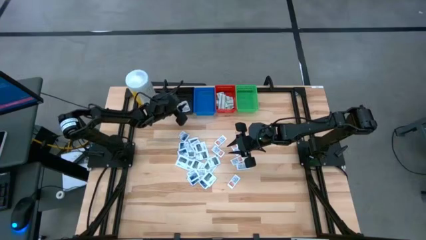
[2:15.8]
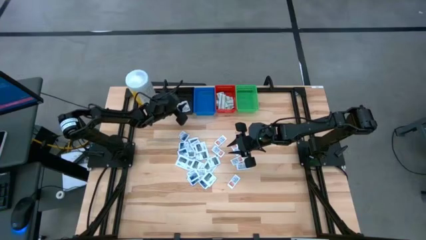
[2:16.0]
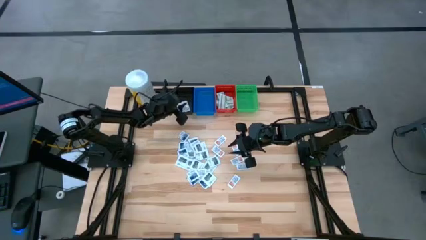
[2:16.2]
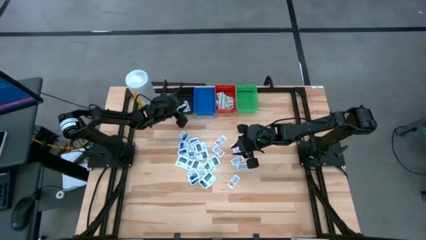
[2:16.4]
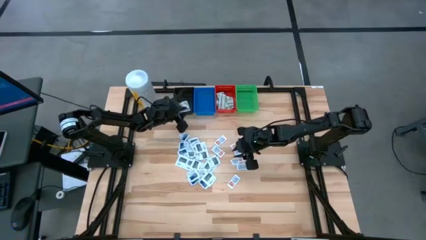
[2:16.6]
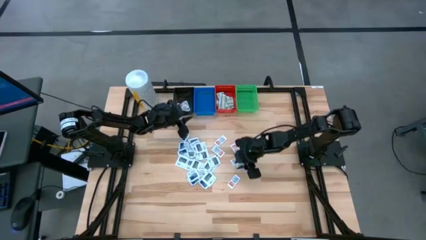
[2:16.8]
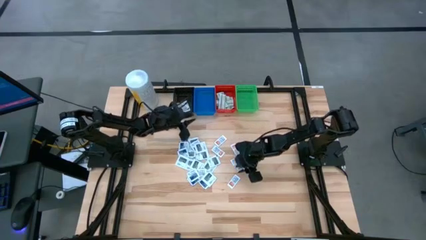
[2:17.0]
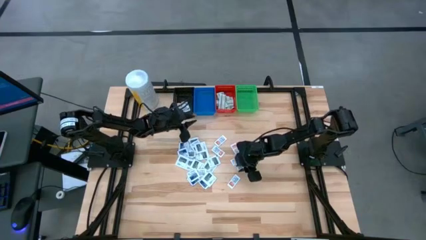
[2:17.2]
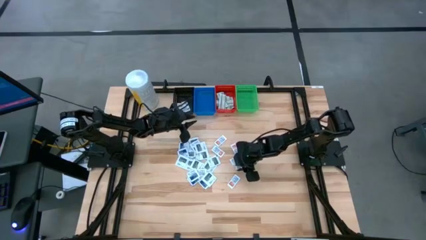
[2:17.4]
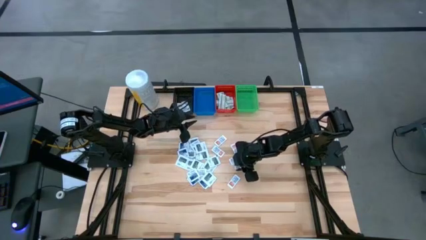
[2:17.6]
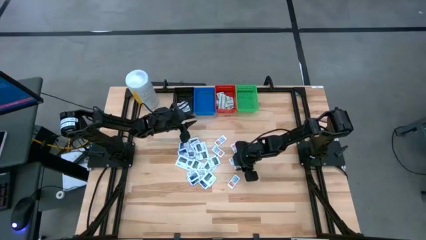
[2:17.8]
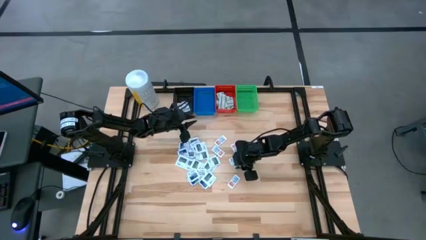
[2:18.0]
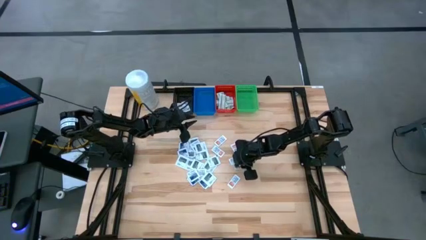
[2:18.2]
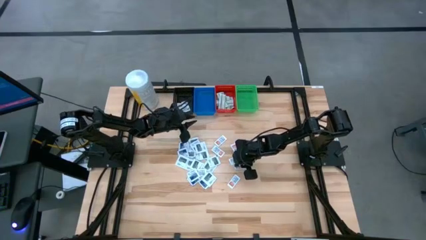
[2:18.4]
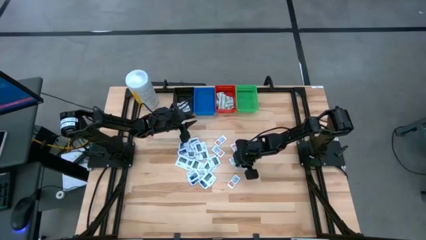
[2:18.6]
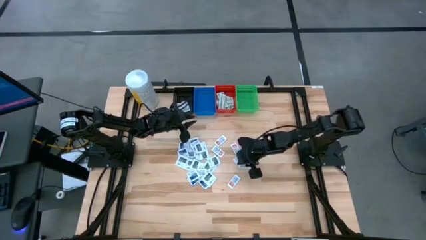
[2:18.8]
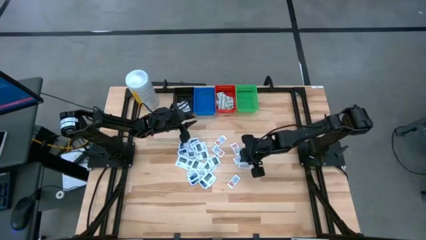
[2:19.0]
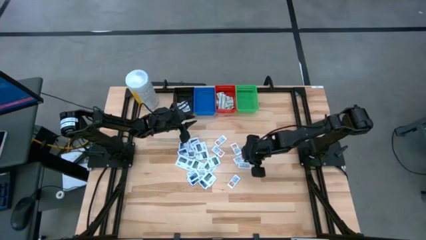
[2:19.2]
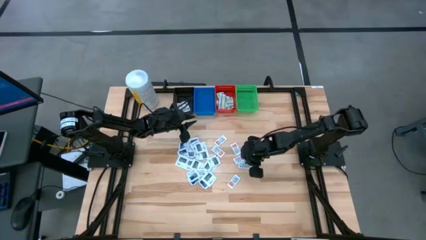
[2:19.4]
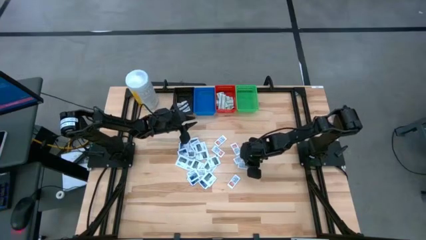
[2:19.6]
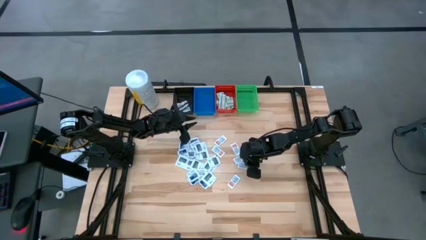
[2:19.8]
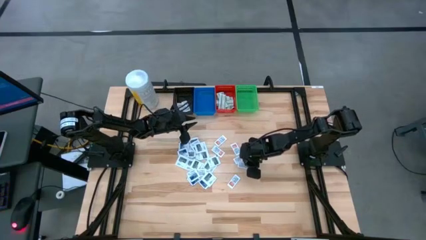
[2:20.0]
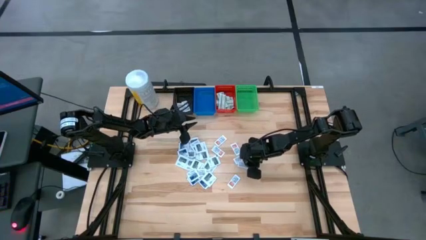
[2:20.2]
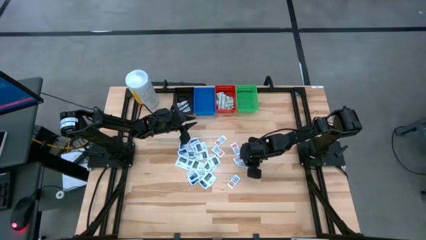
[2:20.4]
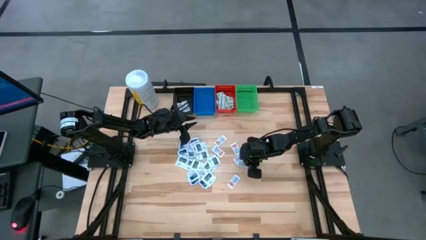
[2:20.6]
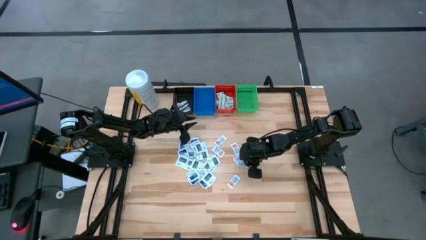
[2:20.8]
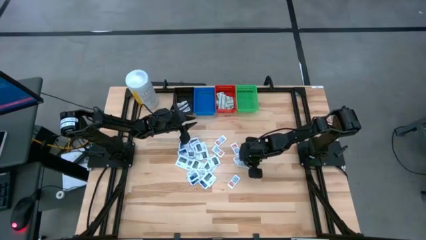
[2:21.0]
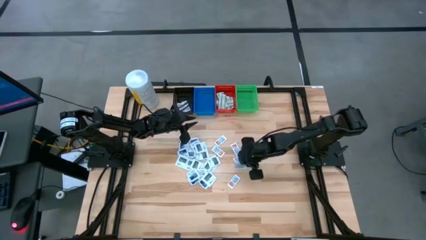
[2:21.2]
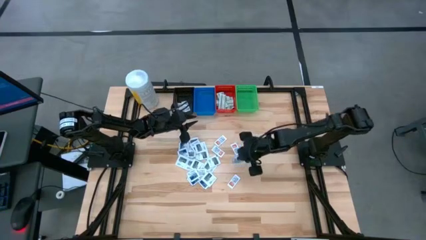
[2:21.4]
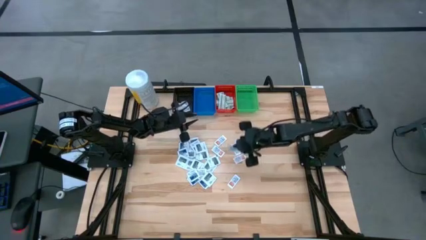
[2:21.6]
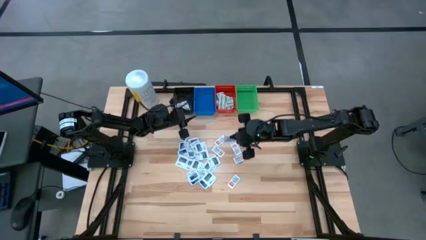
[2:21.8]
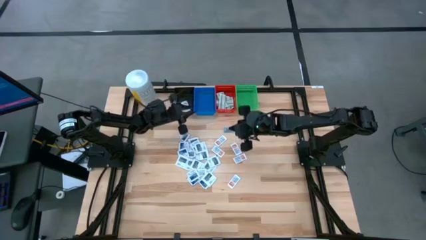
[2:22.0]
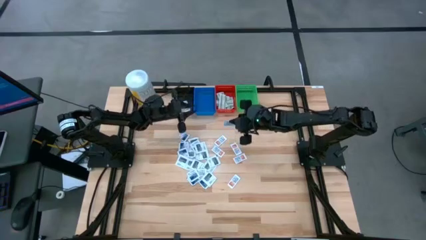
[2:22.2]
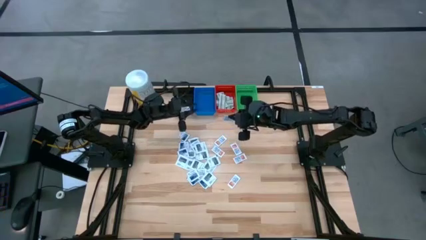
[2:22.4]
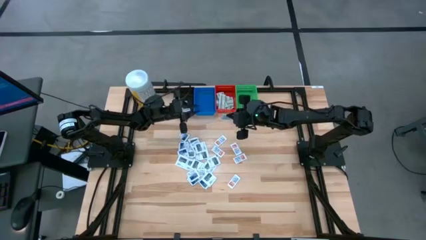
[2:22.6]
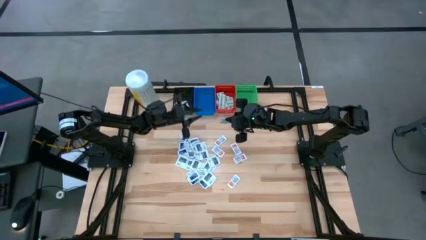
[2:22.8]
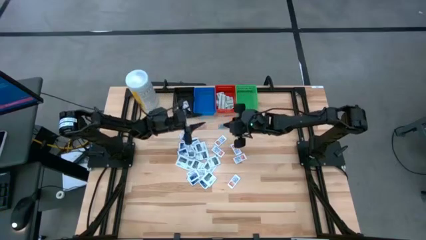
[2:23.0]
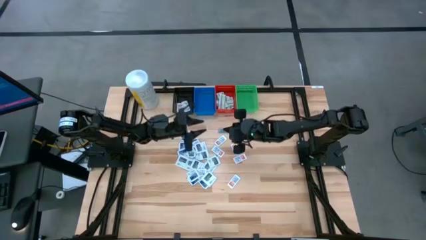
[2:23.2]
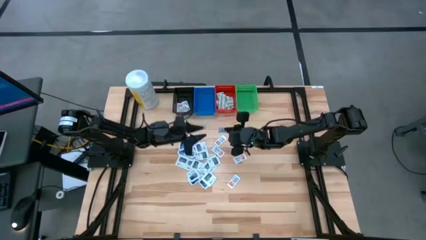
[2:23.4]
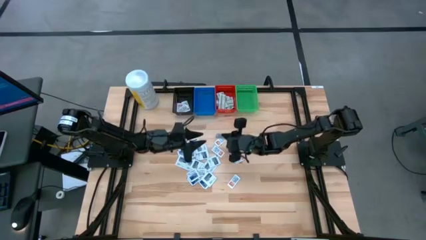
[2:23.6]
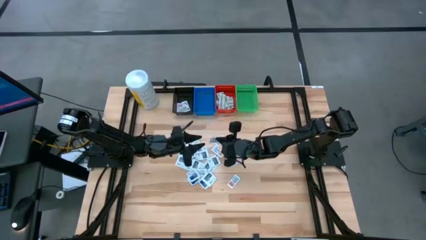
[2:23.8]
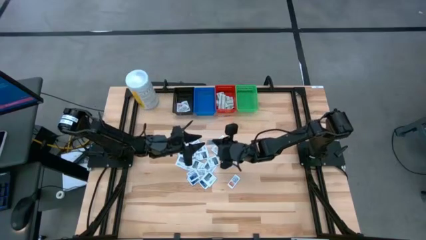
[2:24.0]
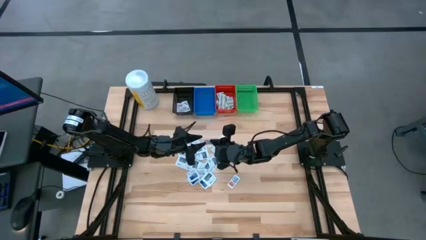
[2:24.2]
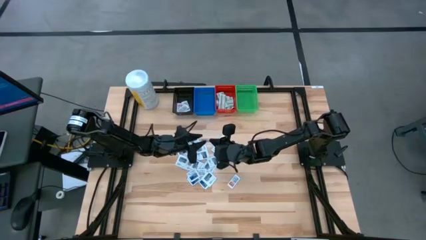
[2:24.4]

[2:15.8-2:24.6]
Task: Pick & Place First Aid Supplies
Put the orange ointment pack into the black bin

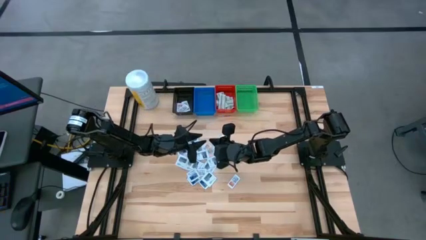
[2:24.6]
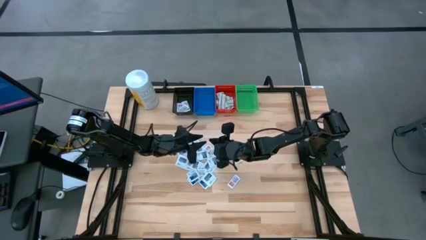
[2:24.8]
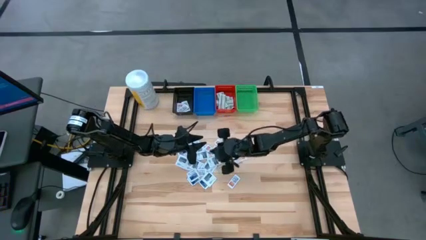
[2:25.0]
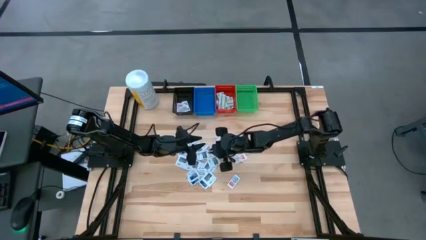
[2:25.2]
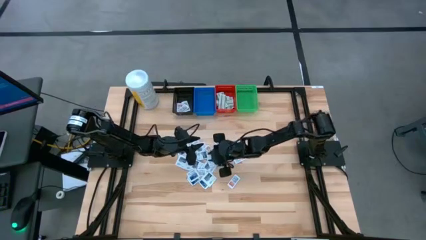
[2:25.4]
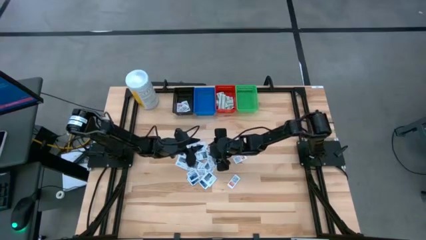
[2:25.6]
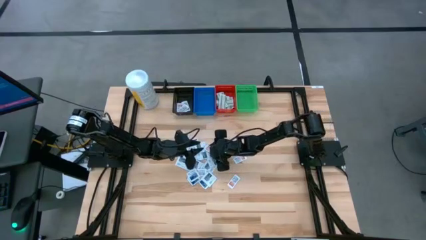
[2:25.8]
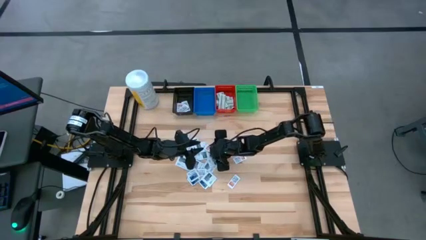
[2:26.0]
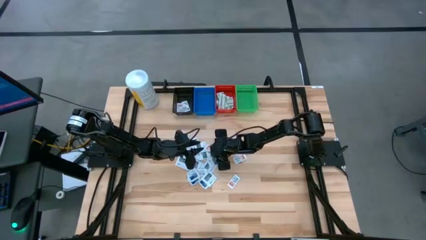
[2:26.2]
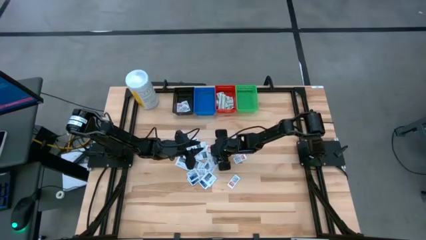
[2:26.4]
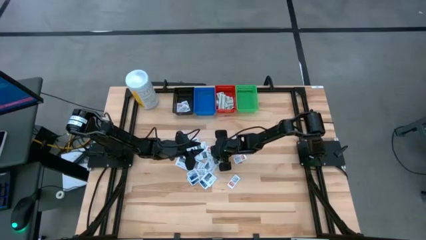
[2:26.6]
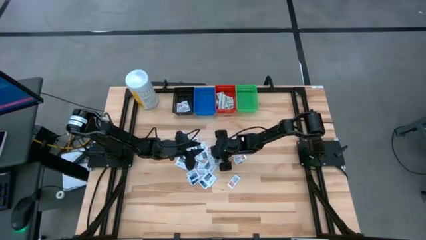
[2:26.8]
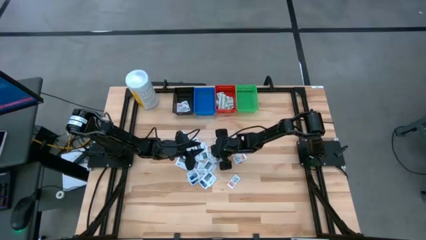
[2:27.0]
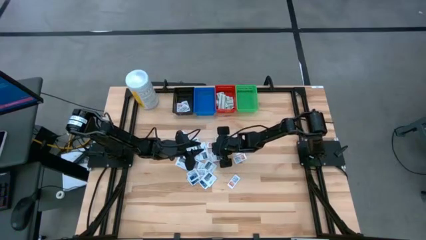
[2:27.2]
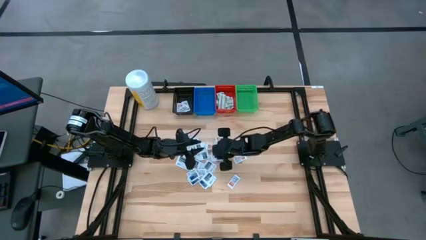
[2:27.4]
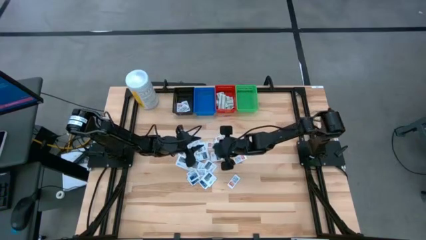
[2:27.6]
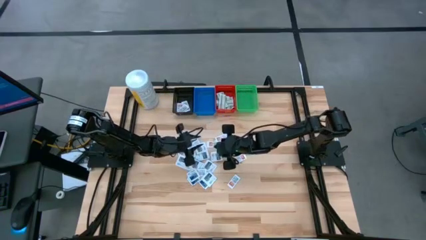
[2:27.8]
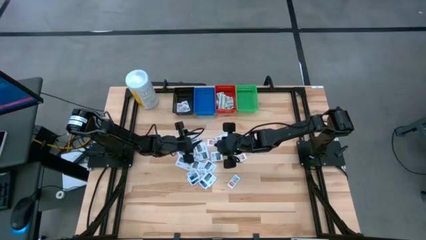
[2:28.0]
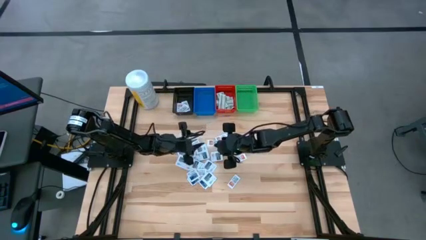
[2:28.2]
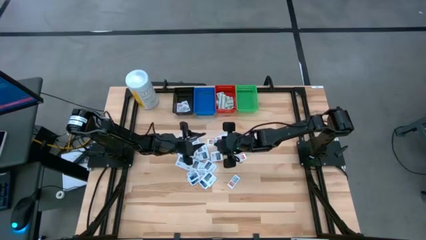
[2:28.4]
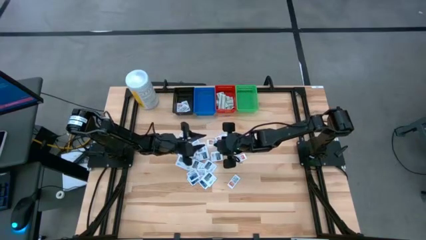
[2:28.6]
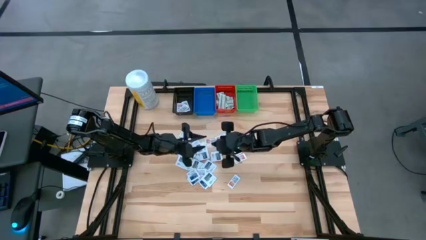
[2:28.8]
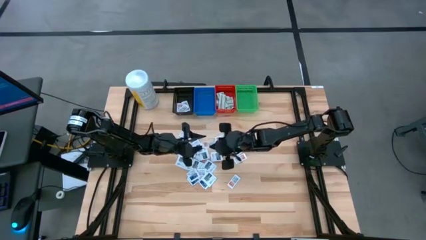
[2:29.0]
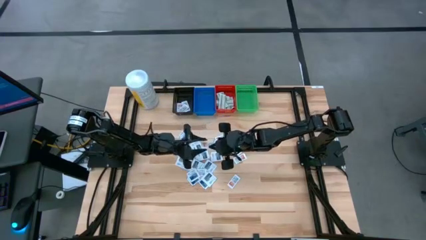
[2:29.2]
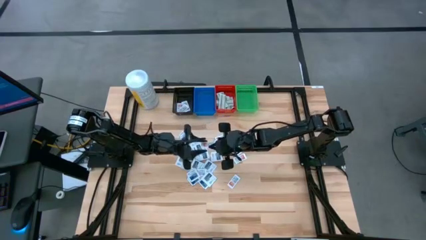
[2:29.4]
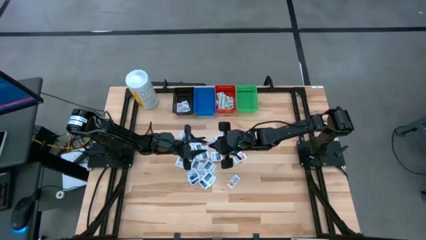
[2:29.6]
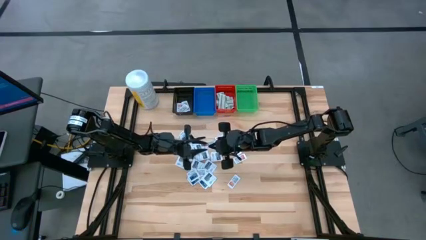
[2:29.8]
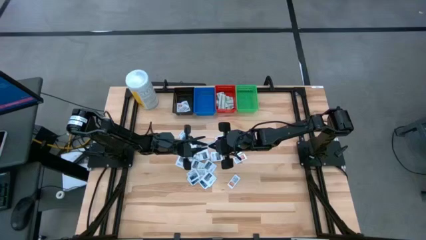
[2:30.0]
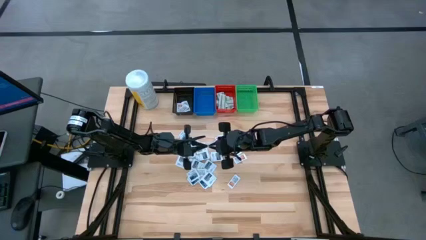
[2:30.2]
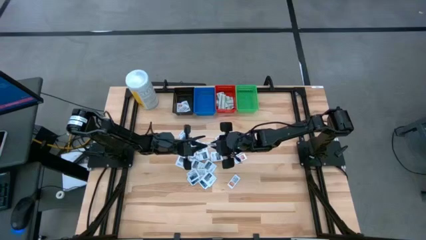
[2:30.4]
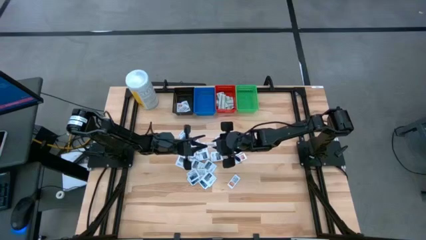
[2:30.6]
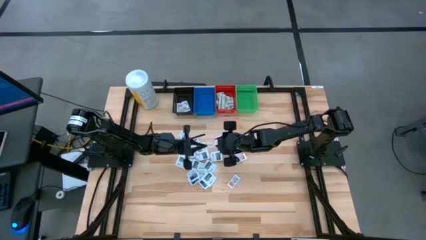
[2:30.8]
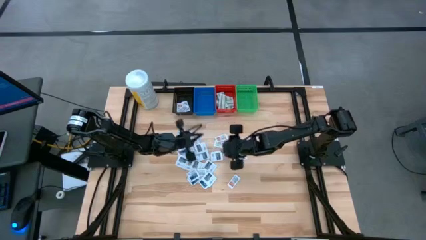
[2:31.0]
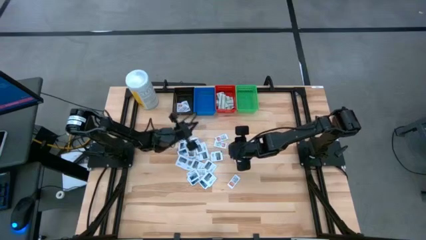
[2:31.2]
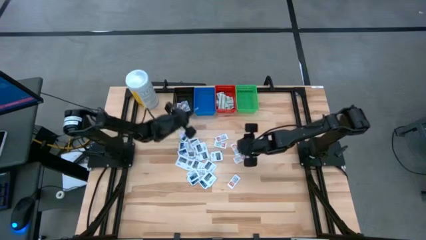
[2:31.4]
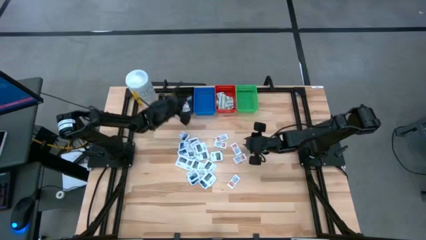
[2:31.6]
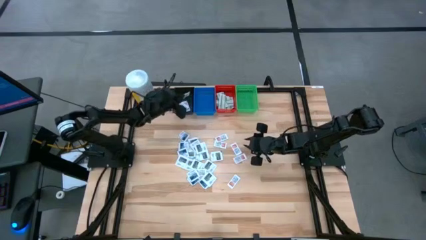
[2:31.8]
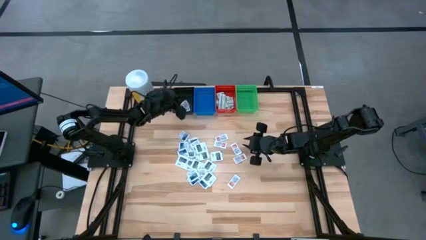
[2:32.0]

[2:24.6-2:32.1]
Put the orange ointment pack into the black bin
